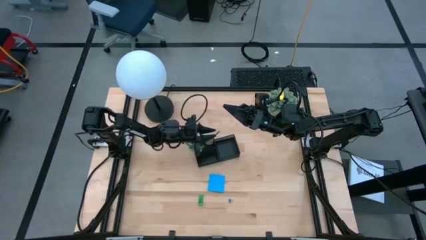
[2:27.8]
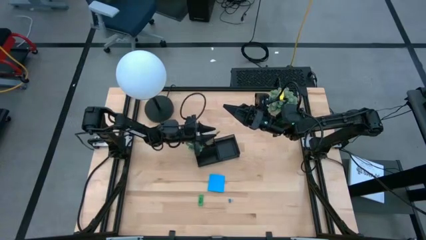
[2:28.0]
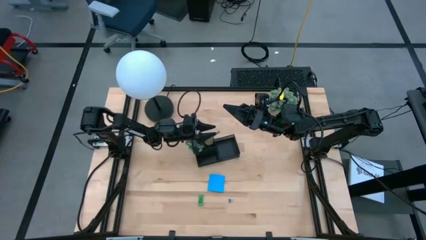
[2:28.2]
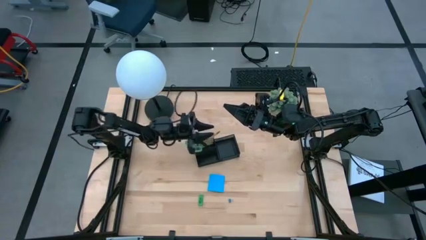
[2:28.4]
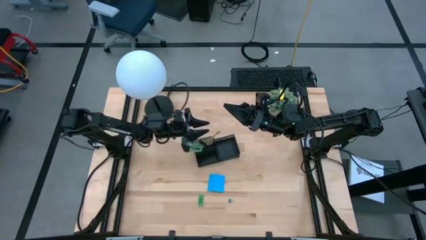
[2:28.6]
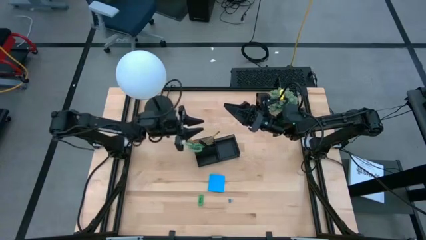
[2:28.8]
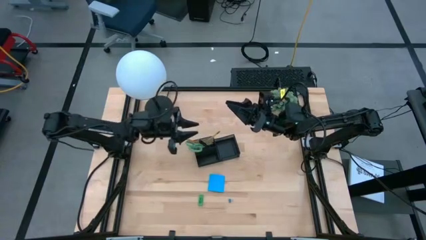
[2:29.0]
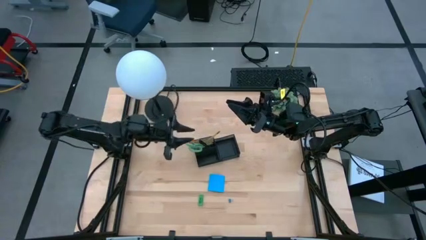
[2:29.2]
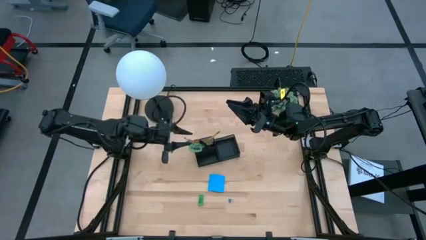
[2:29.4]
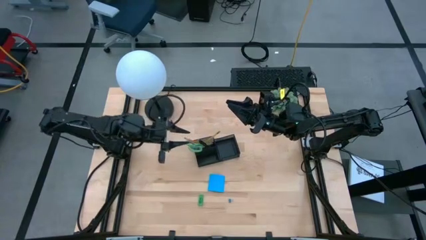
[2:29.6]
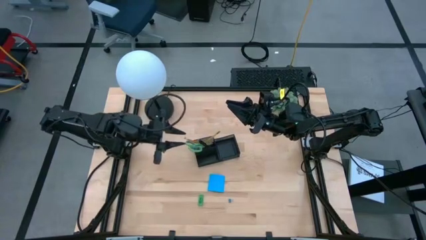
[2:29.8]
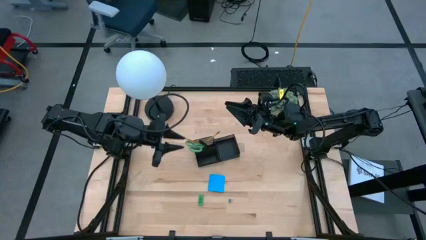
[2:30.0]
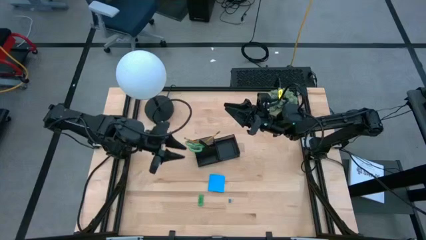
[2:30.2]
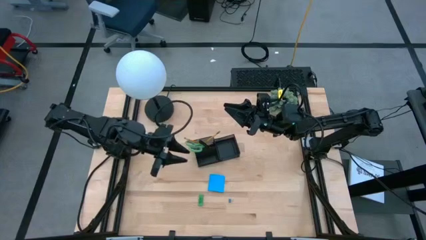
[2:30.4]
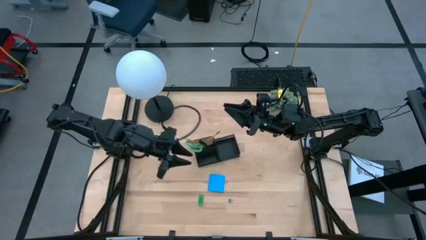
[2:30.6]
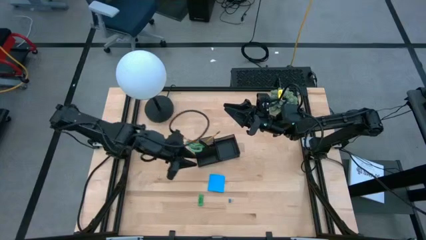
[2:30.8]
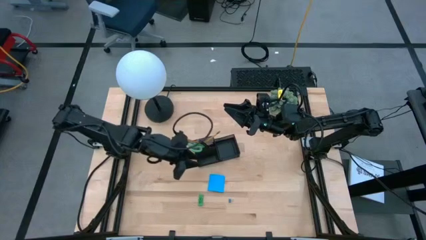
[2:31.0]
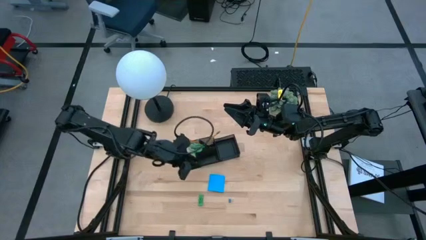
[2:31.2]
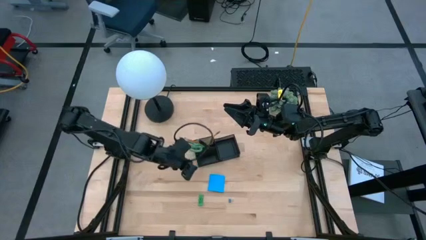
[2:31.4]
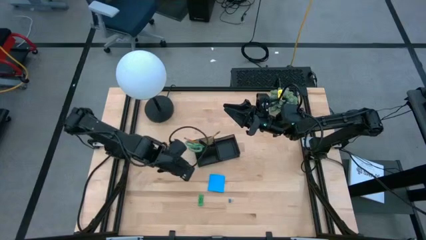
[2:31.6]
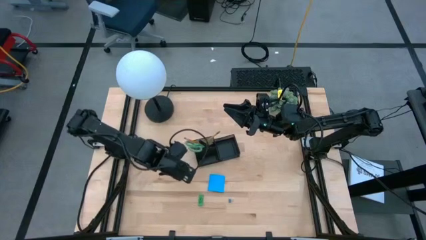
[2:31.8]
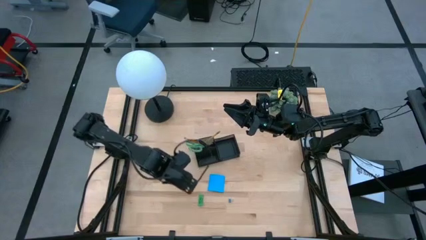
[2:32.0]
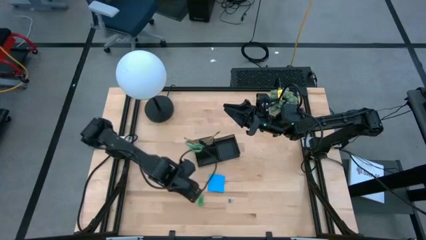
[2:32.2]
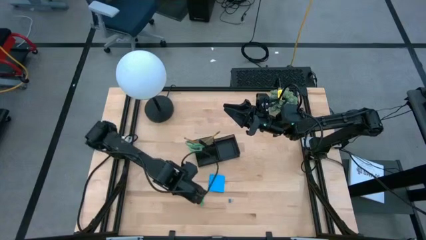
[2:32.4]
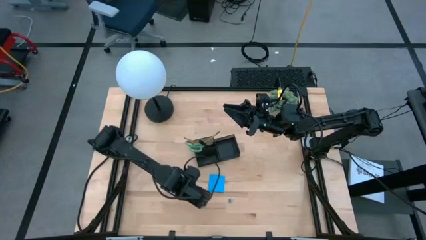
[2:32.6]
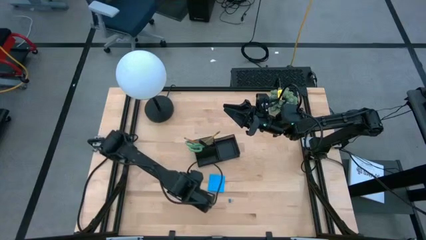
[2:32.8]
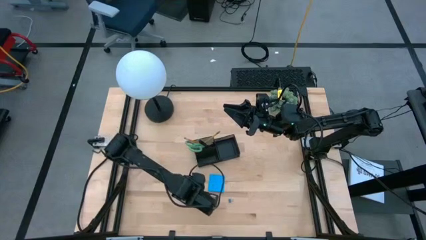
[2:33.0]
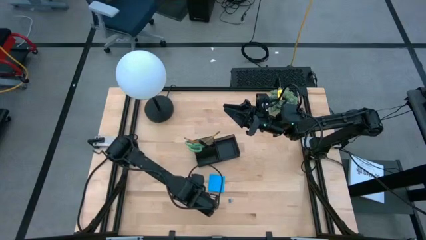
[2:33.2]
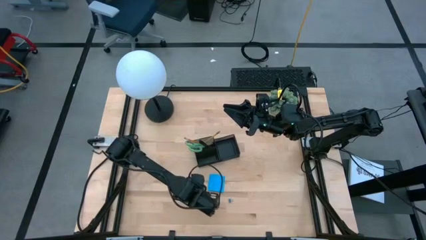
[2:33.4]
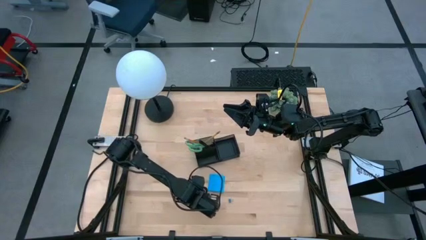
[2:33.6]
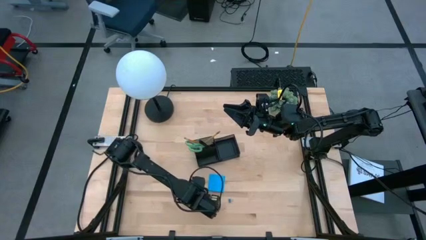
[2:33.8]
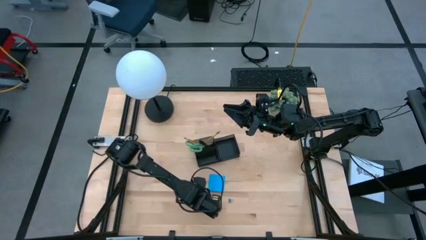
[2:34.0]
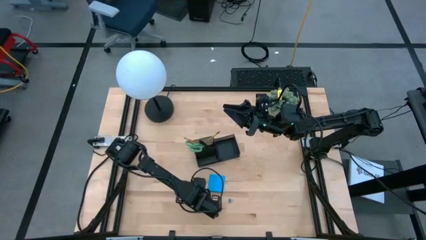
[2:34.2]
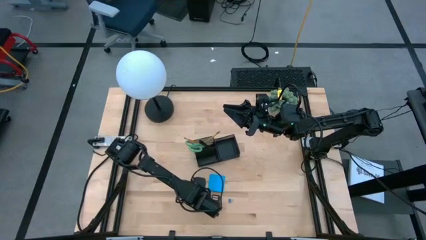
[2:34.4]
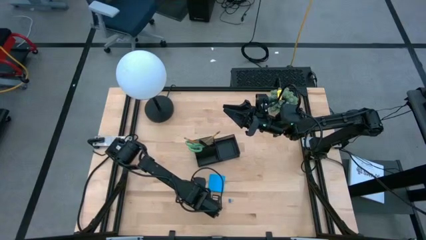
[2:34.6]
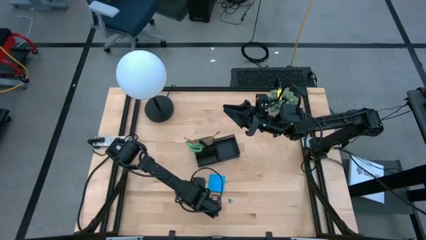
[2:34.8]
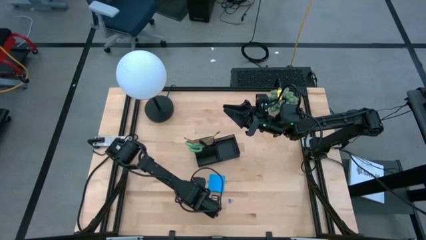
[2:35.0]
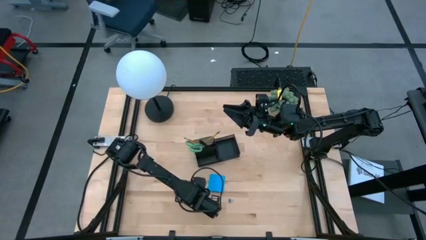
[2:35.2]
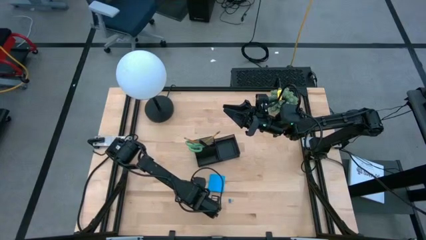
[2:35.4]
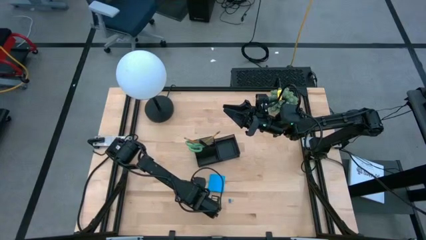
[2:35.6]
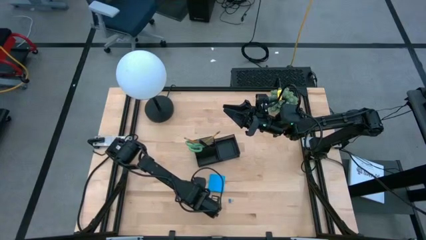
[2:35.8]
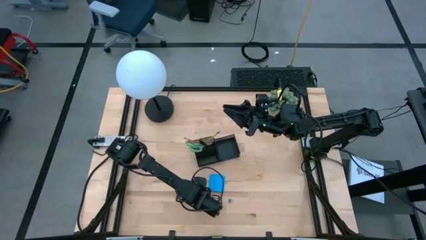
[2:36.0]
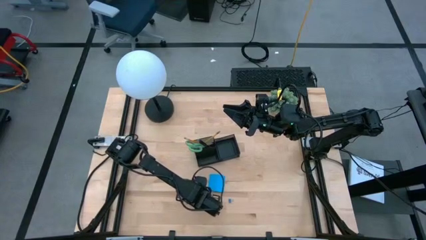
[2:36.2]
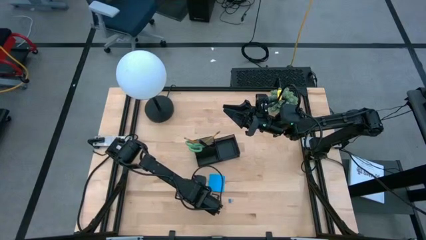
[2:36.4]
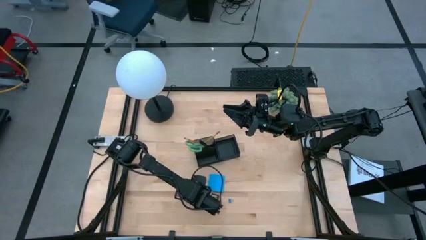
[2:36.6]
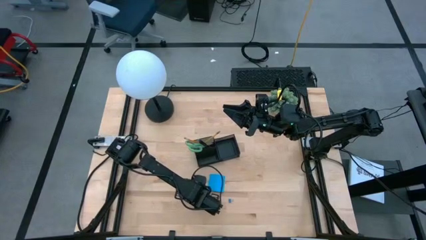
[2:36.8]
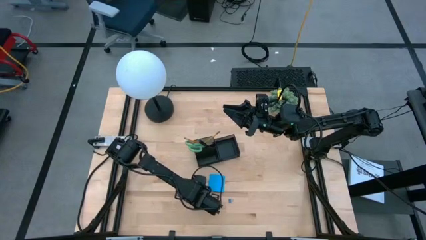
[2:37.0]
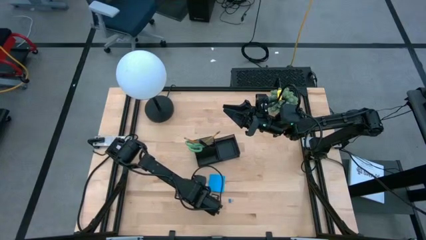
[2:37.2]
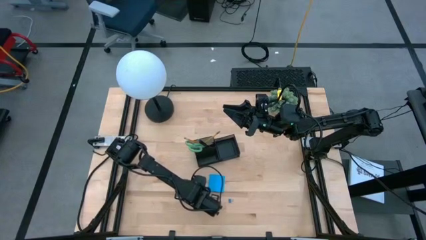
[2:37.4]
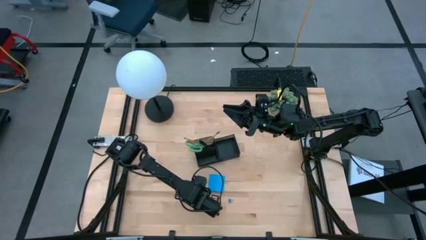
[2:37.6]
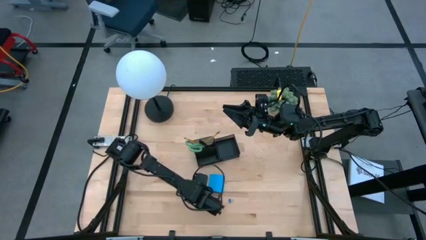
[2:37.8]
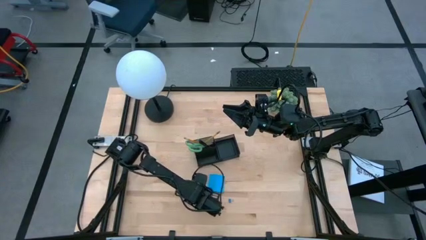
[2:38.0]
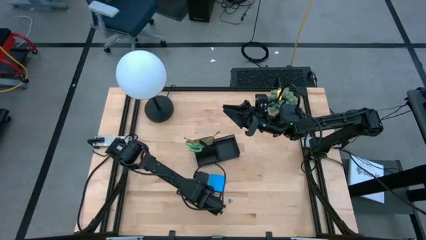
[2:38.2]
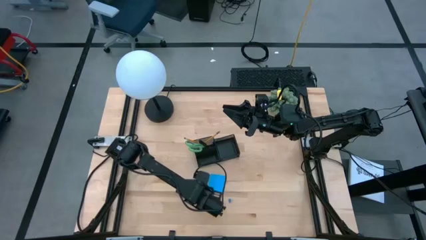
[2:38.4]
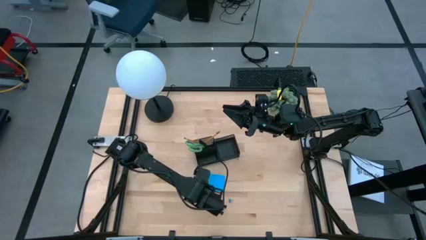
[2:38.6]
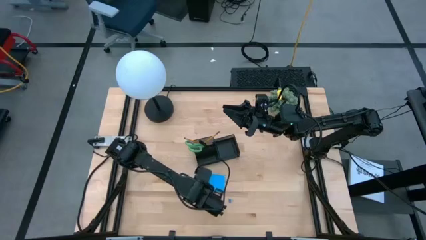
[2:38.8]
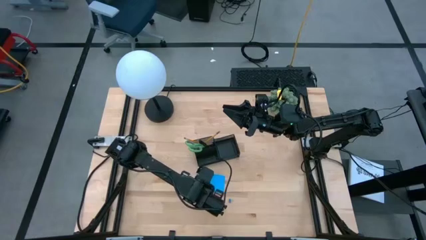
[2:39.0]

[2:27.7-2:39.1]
Task: Pick and place office supplies into organizer
Put the green eraser into the black desk organizer
